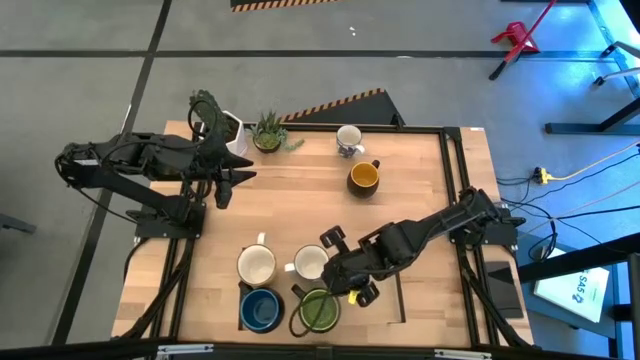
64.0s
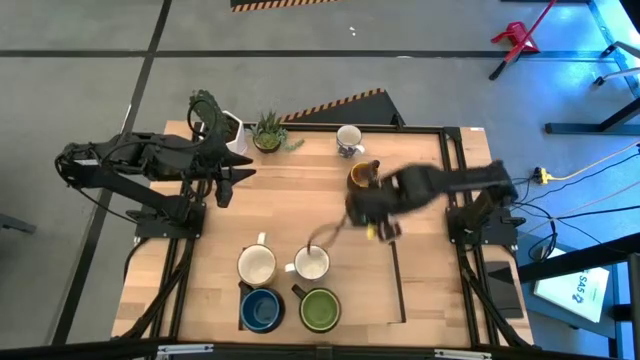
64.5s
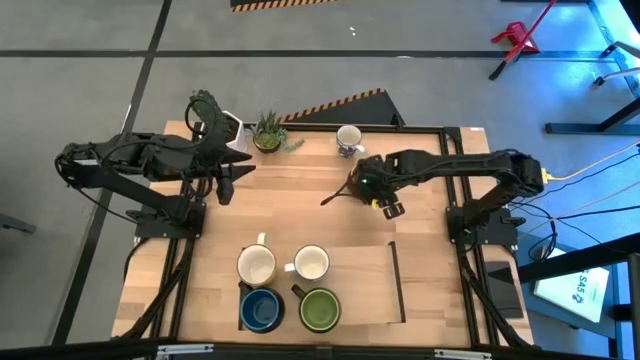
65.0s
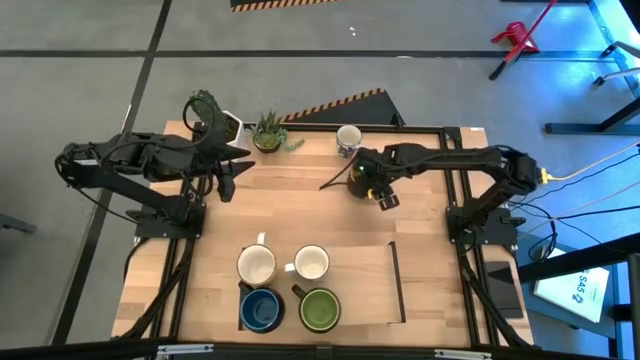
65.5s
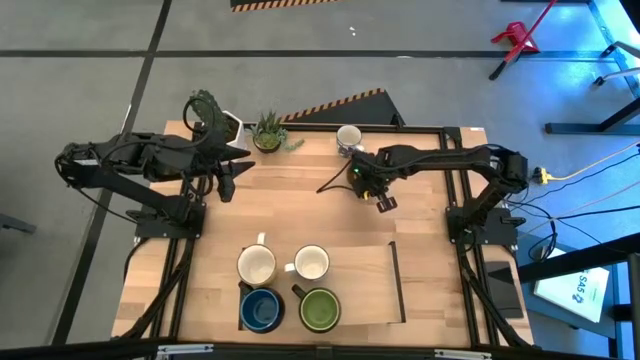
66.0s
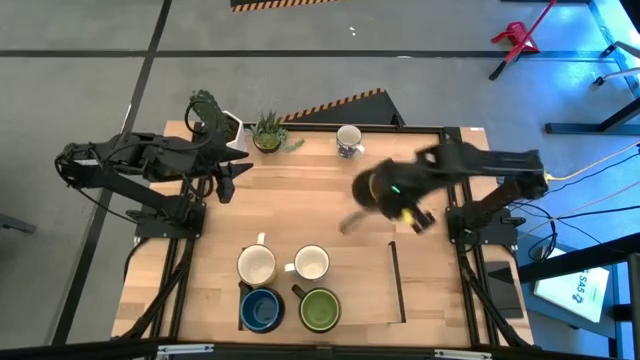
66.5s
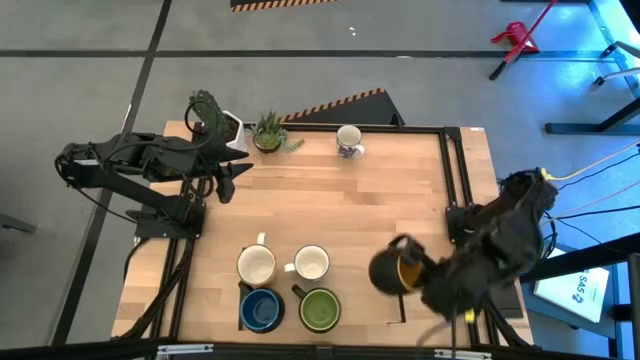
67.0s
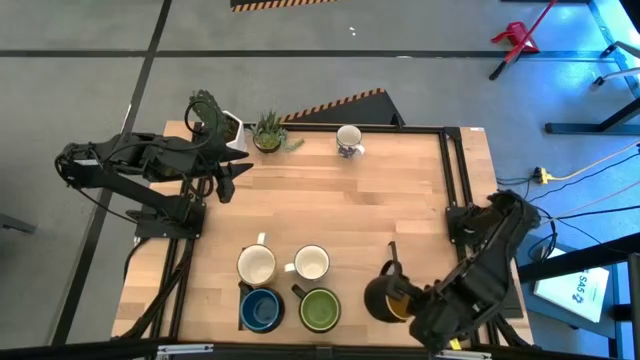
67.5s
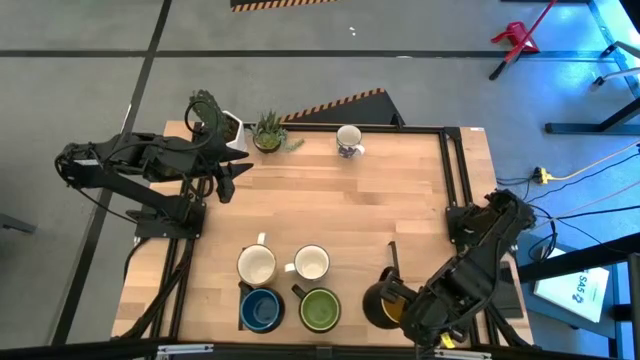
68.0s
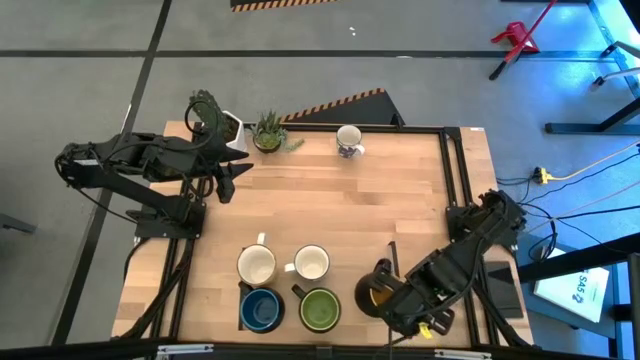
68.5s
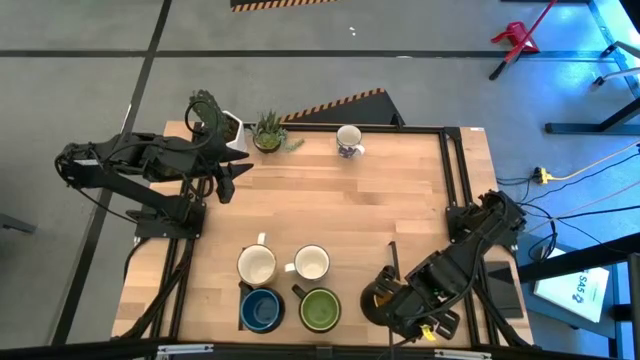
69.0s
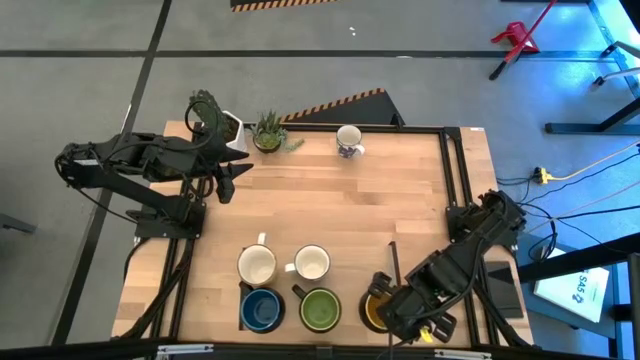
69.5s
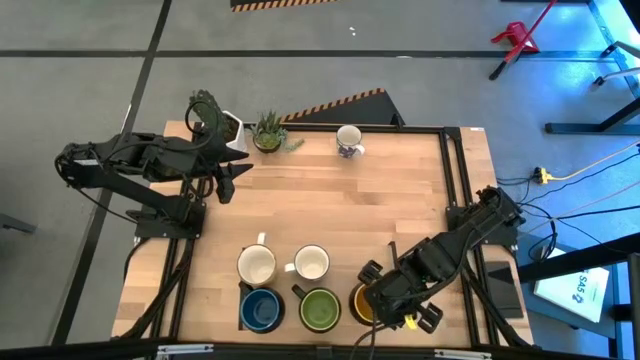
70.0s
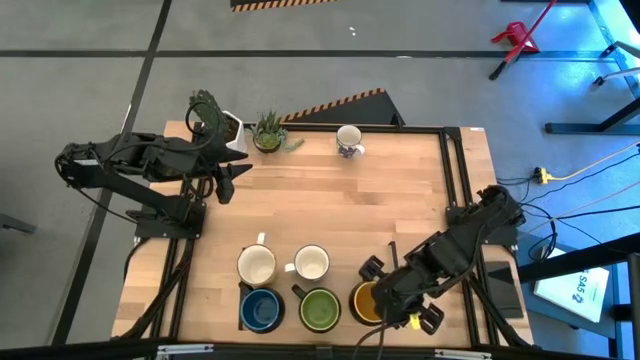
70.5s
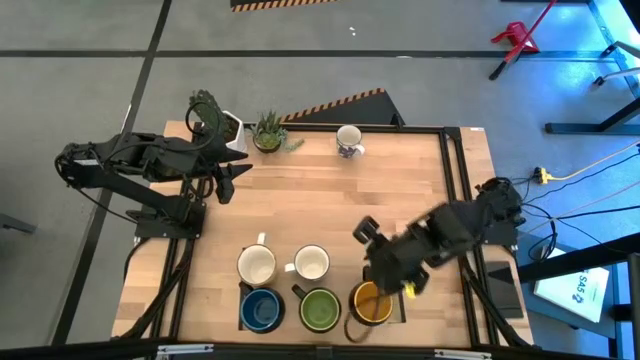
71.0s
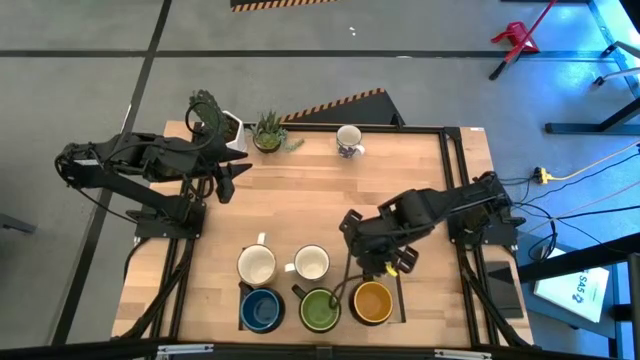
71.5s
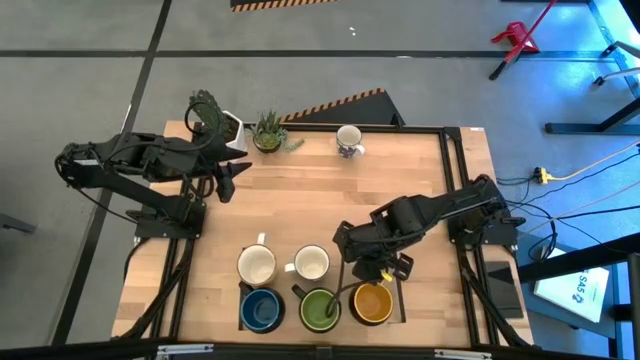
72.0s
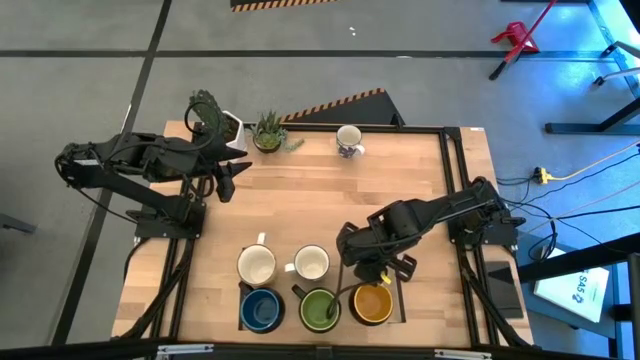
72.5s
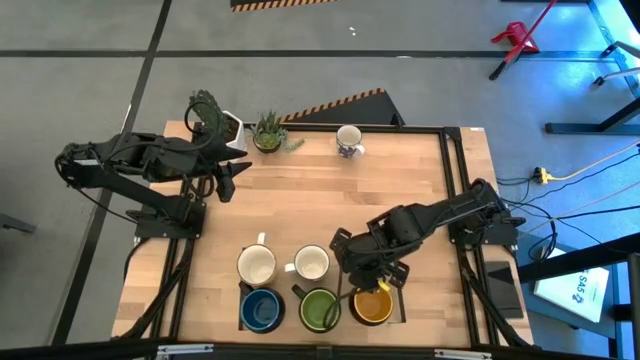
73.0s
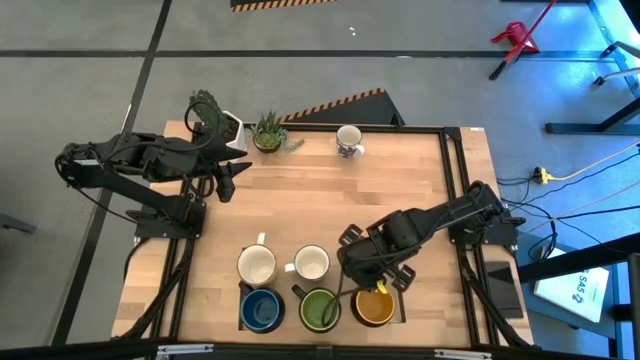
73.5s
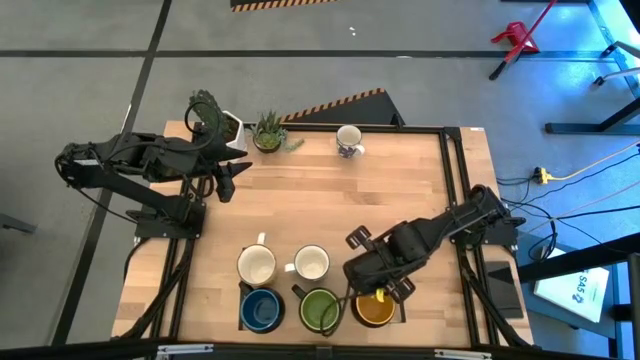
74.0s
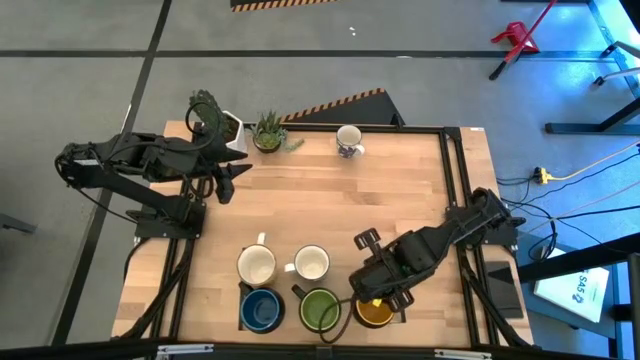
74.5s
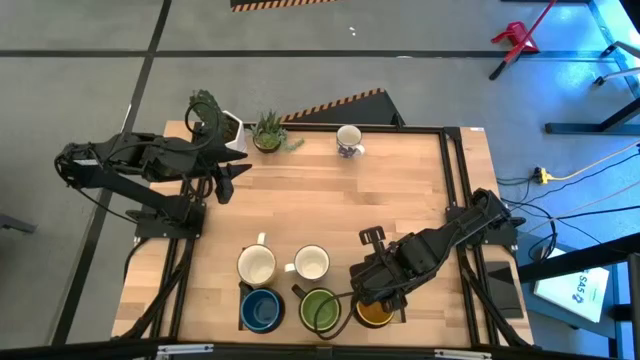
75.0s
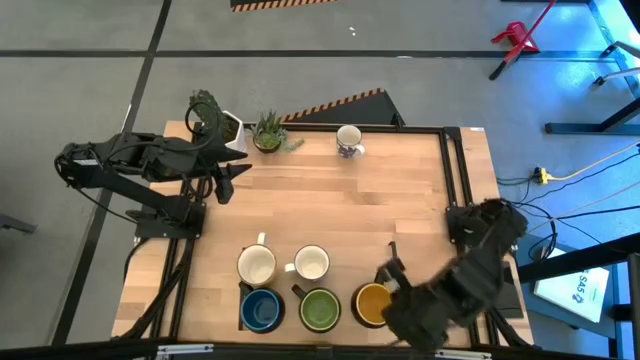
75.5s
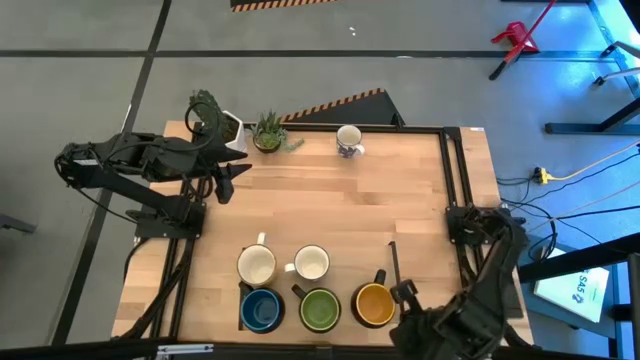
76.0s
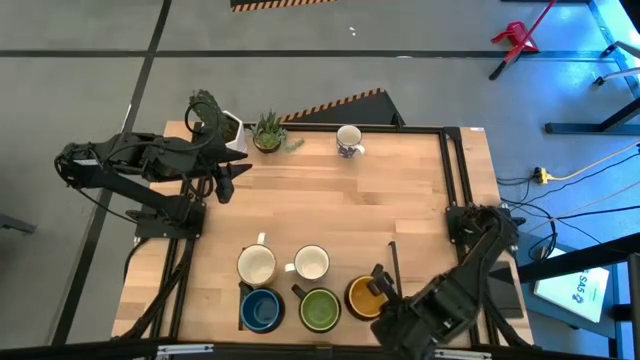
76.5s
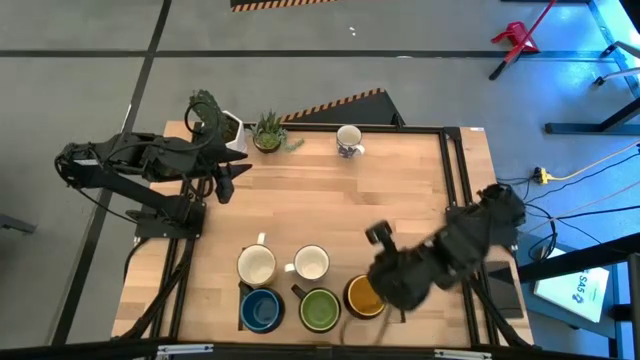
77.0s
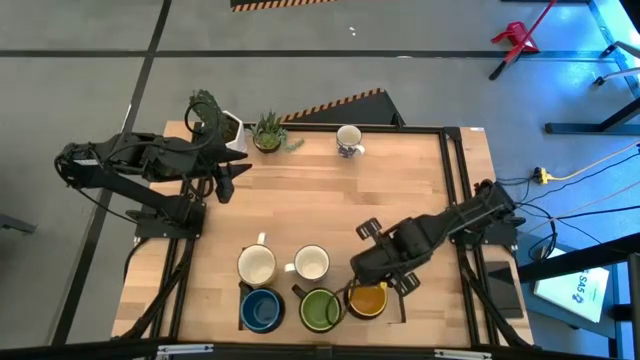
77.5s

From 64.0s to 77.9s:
Task: Place coffee mugs
Put the yellow mug on the shelf

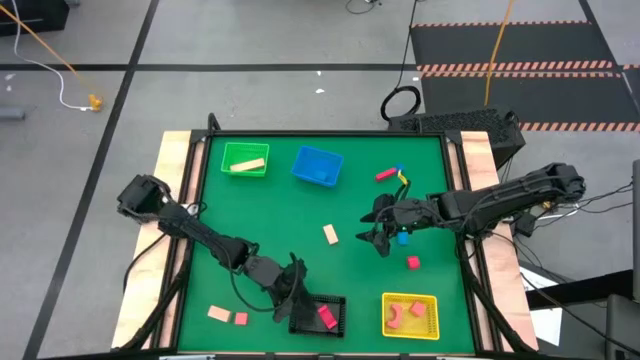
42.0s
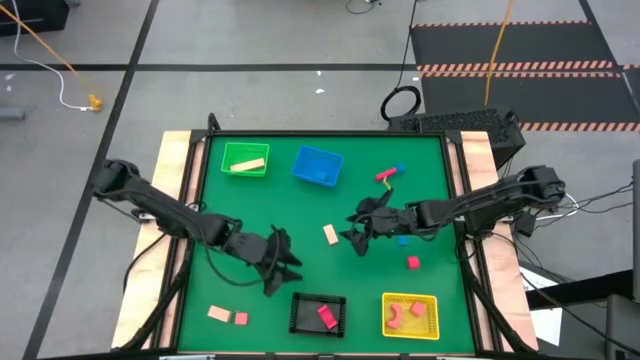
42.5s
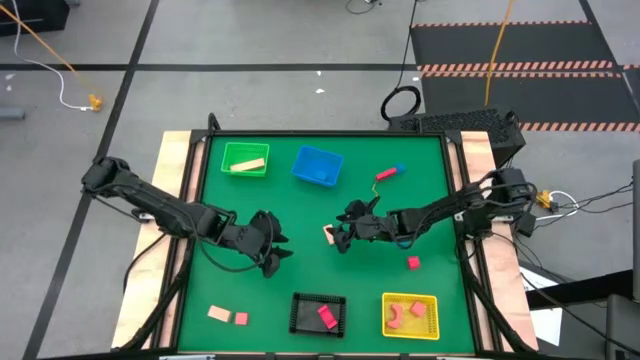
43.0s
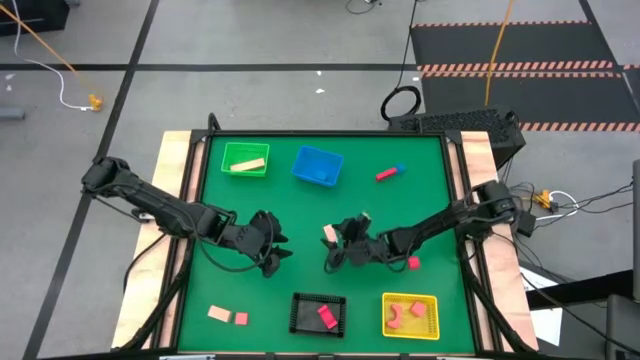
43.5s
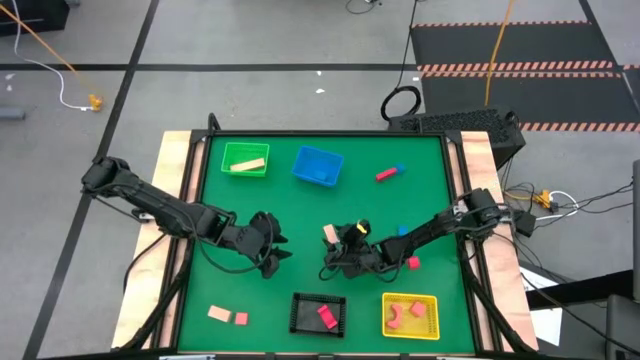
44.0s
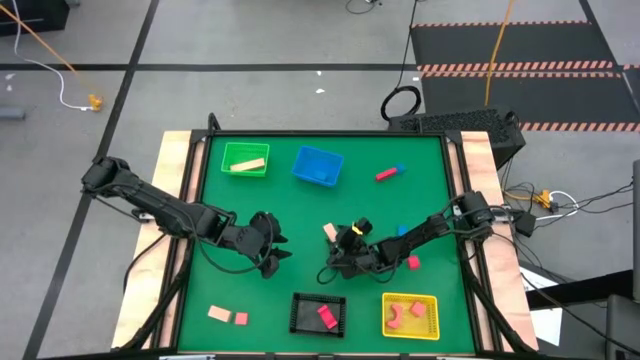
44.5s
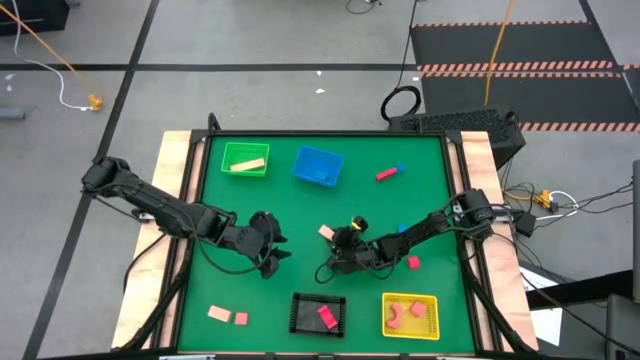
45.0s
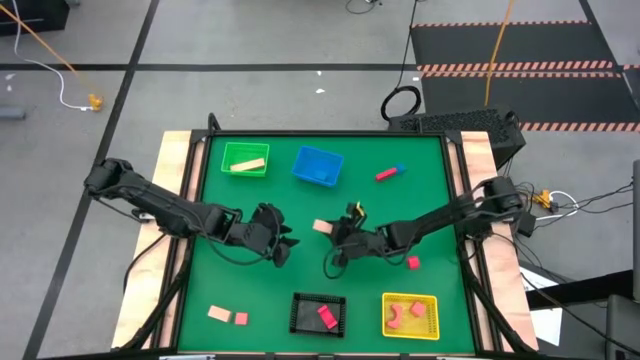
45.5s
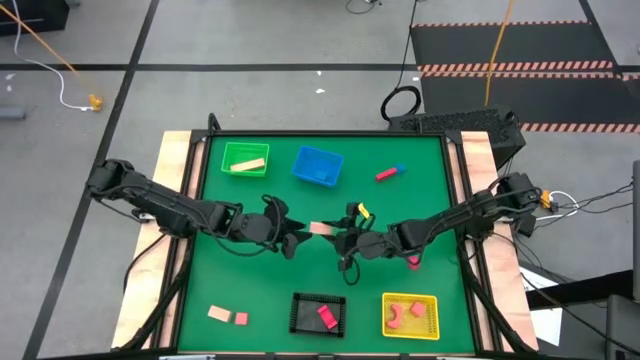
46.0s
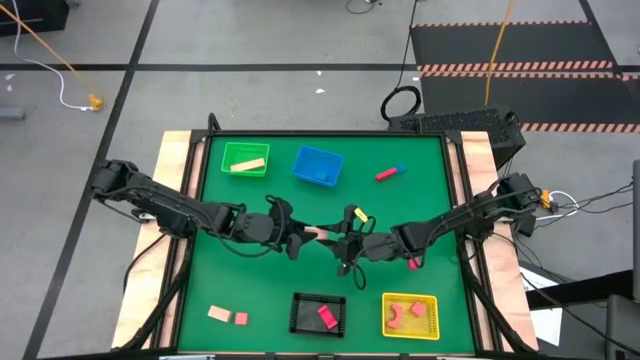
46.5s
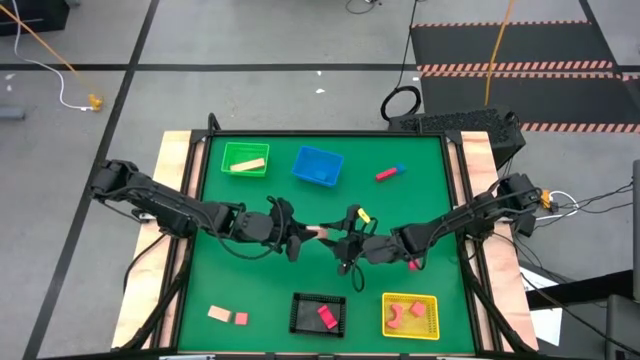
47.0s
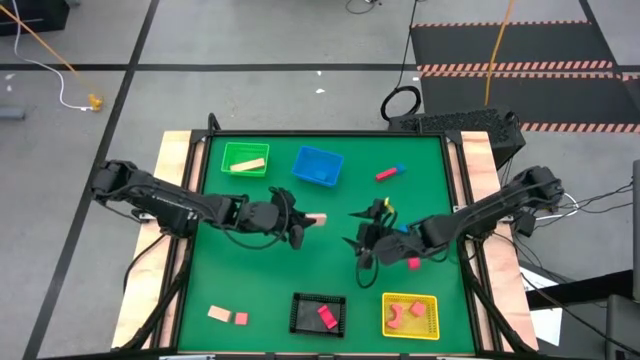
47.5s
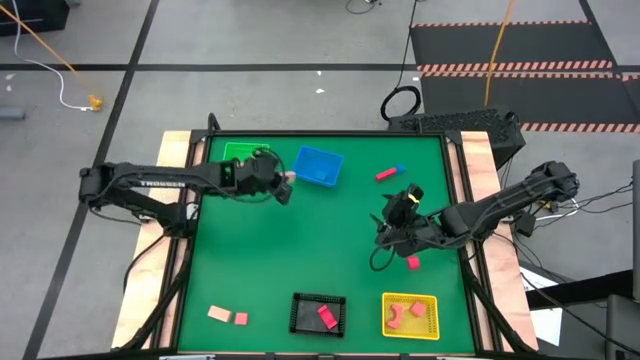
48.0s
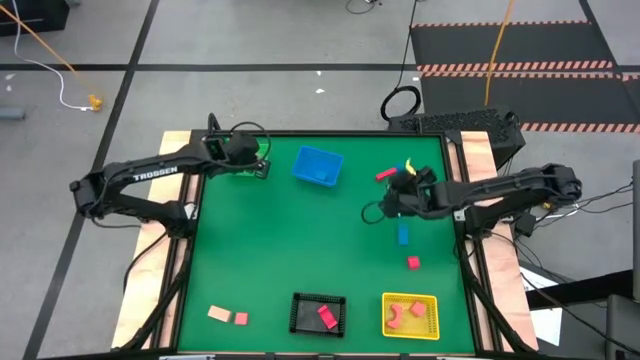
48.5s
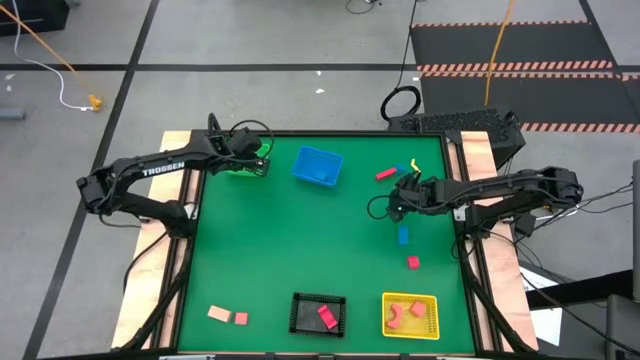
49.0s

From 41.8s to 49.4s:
Task: Sort & place blocks by color
Put the right brown wooden block into the green basket
